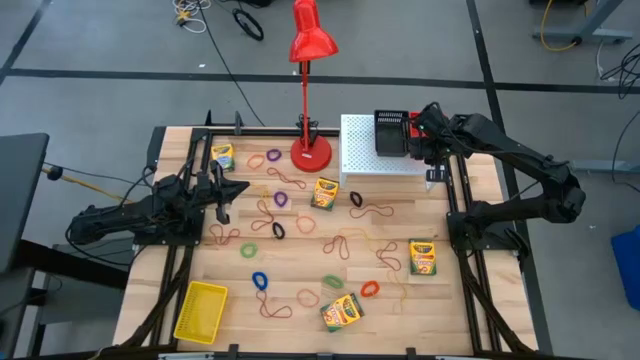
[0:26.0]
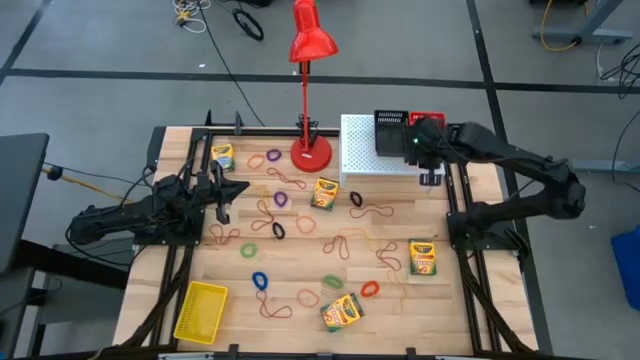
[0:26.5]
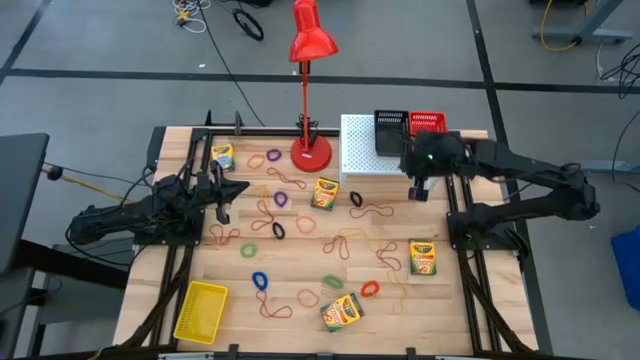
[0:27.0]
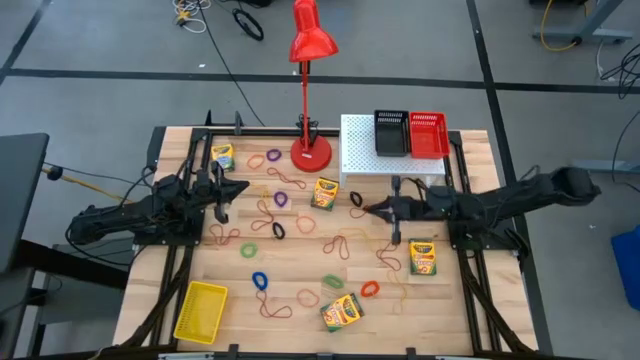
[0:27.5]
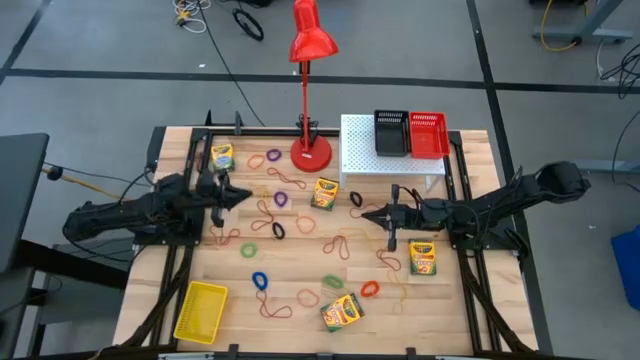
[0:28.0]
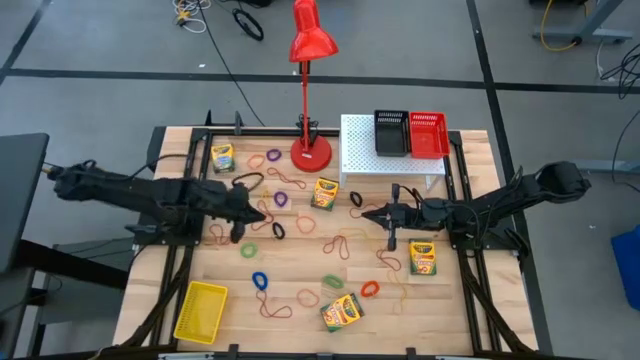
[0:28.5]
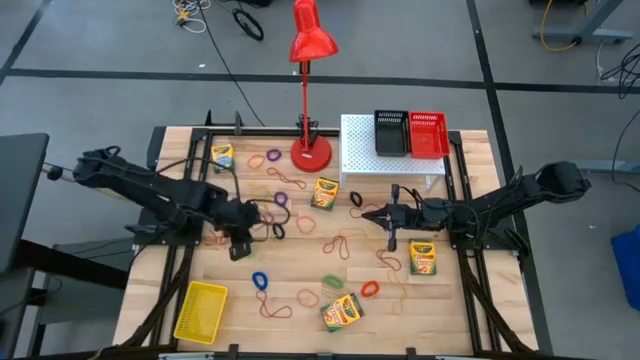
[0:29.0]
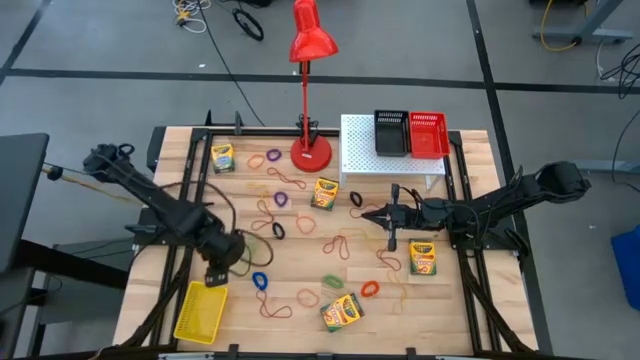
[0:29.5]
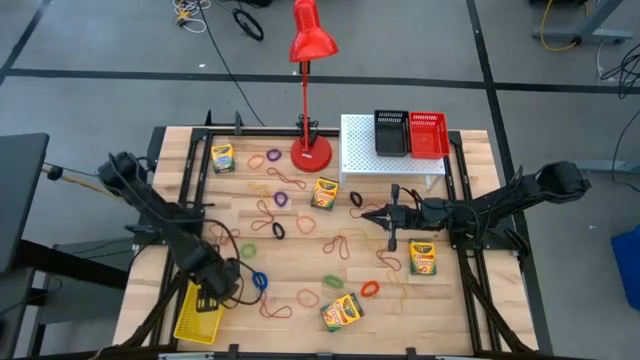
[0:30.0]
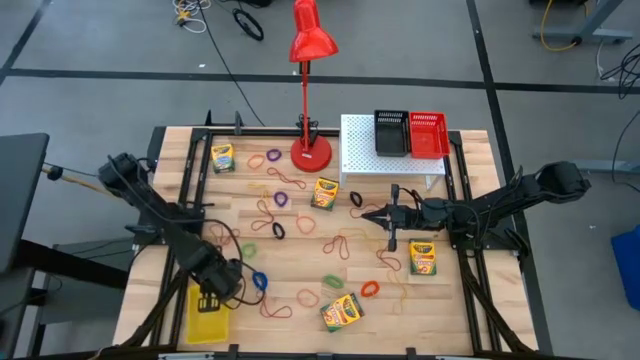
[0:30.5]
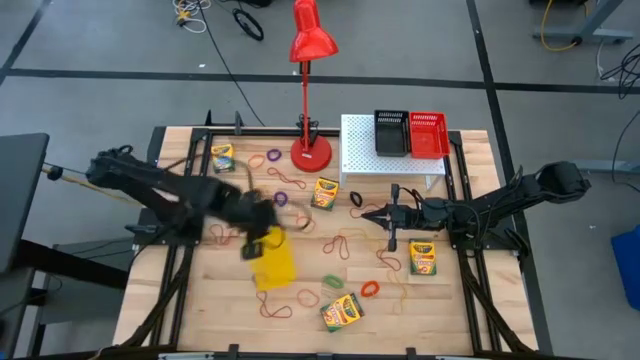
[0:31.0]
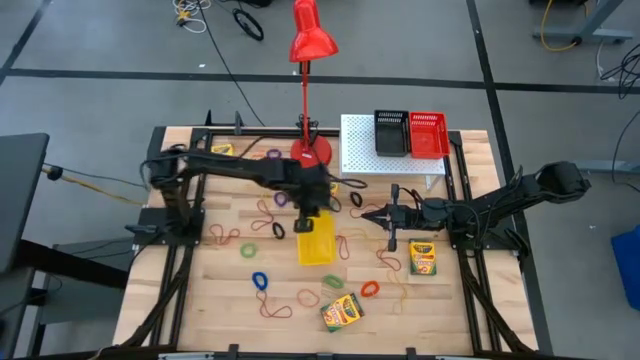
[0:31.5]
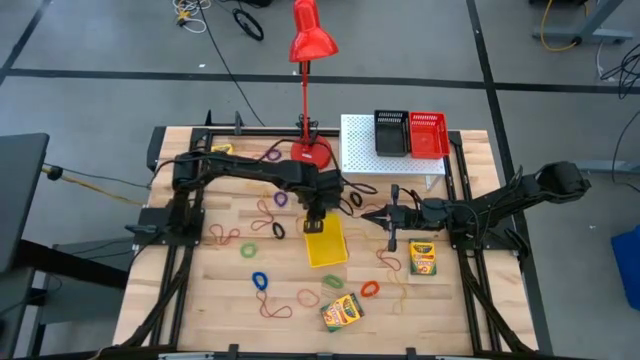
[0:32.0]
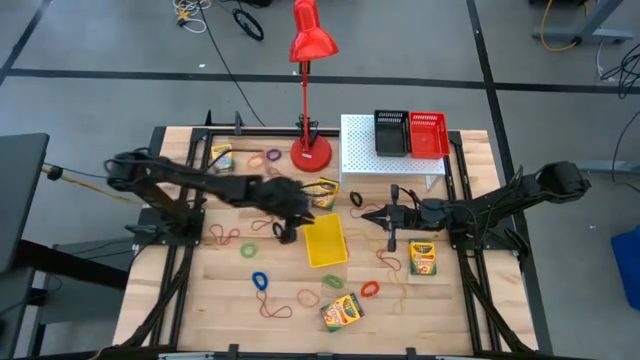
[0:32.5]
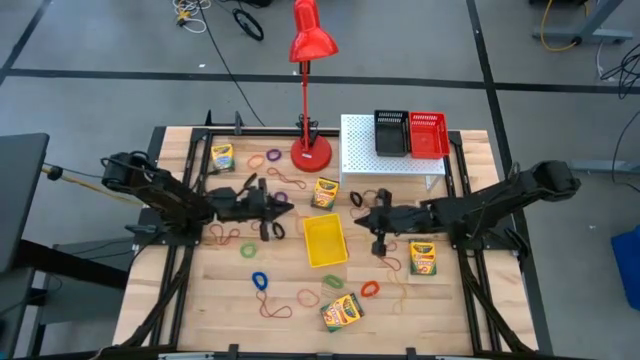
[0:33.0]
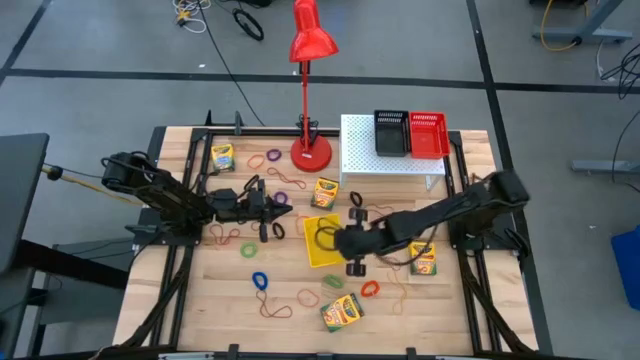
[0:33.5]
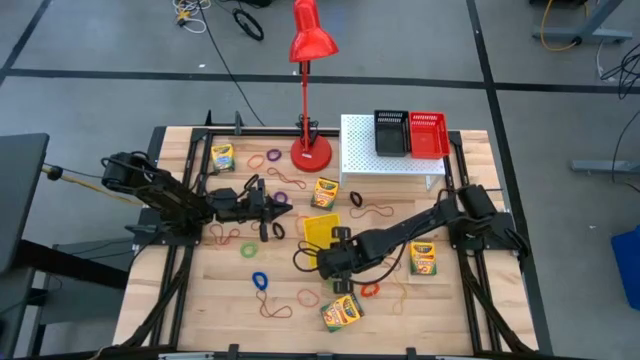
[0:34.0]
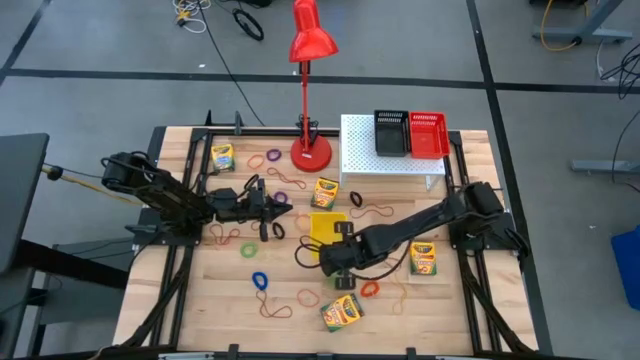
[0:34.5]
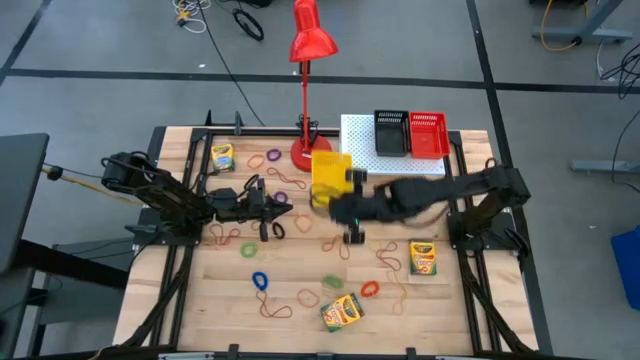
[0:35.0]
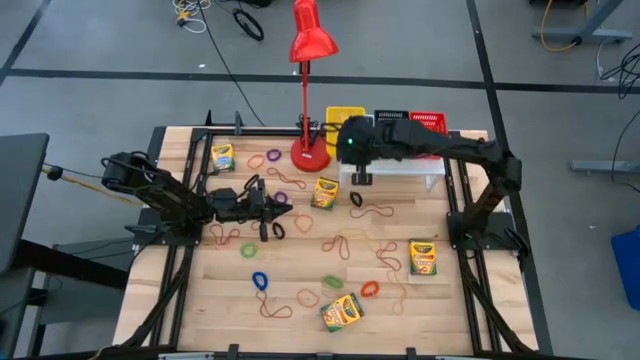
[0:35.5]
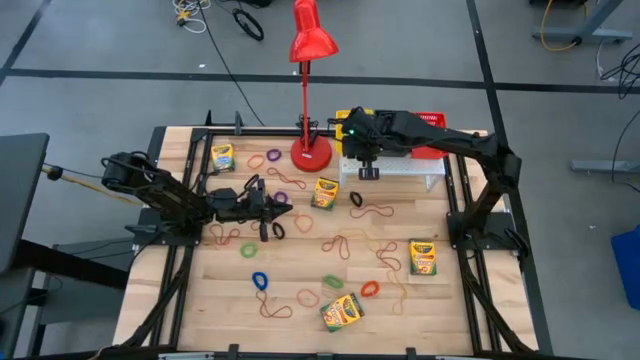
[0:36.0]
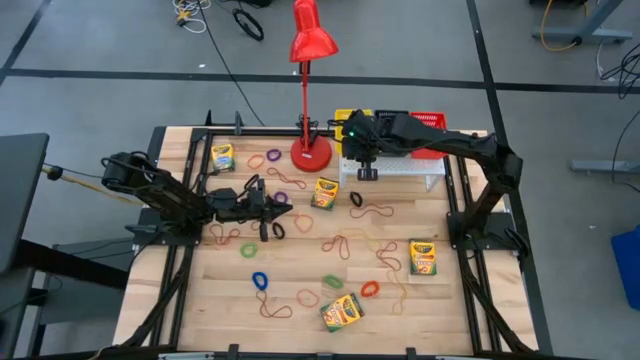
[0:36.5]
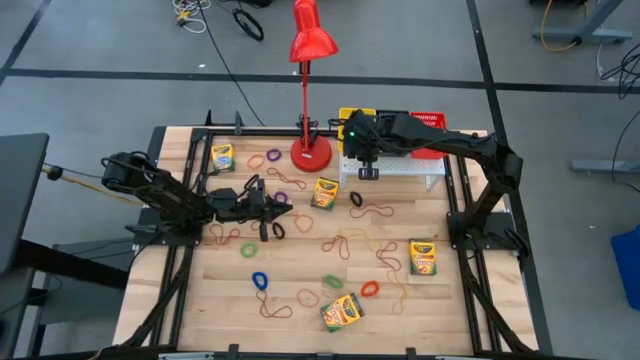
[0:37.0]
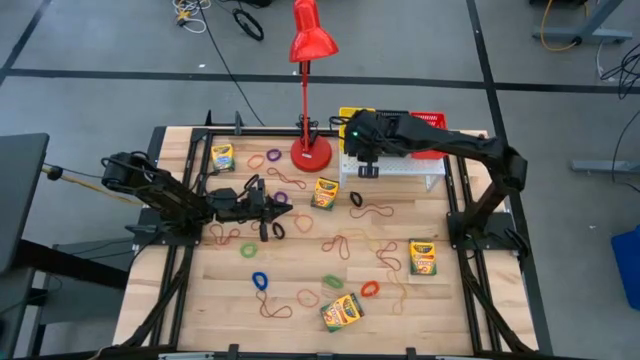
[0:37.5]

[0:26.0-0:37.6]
Task: Pick & Place Office Desk Supplies
Put the yellow bin on the shelf

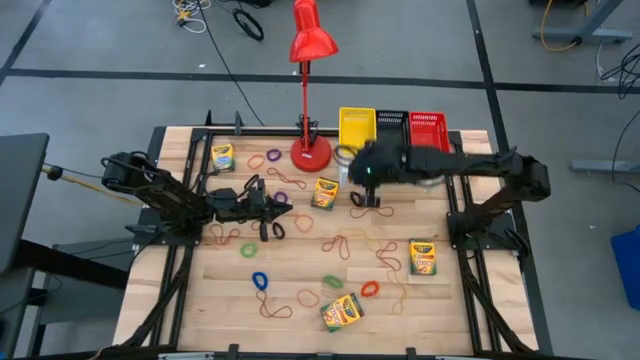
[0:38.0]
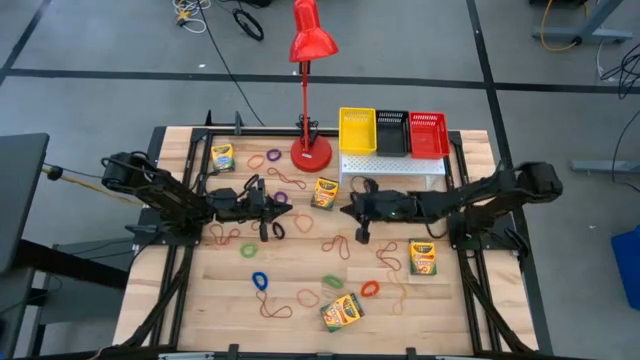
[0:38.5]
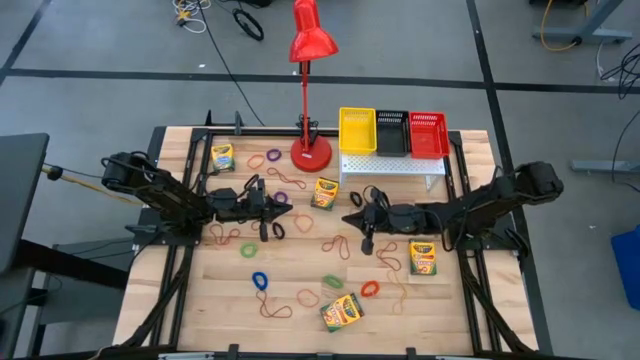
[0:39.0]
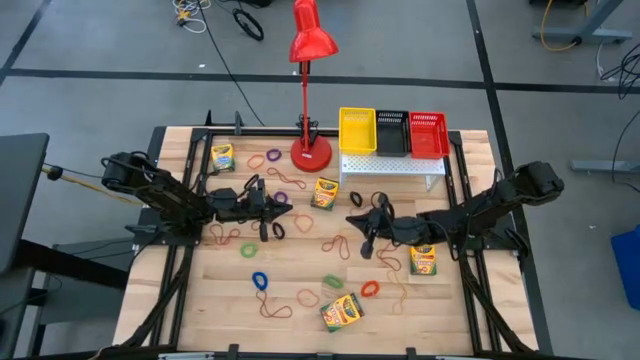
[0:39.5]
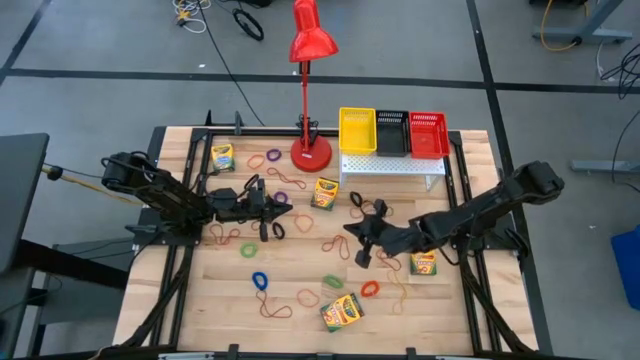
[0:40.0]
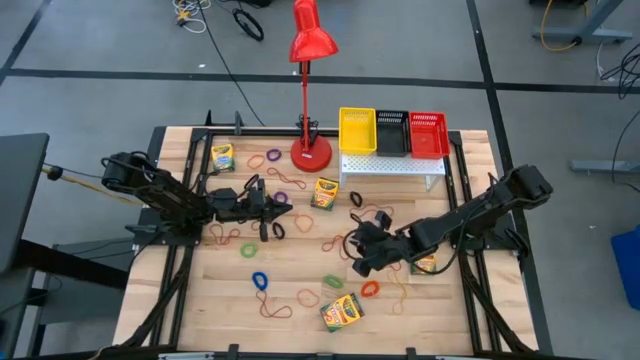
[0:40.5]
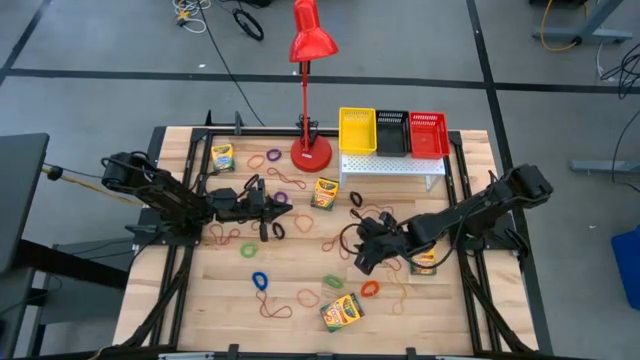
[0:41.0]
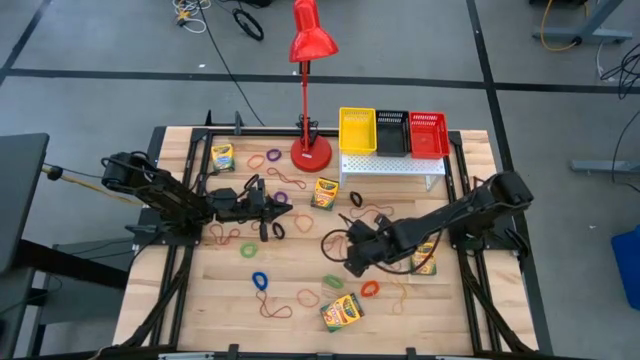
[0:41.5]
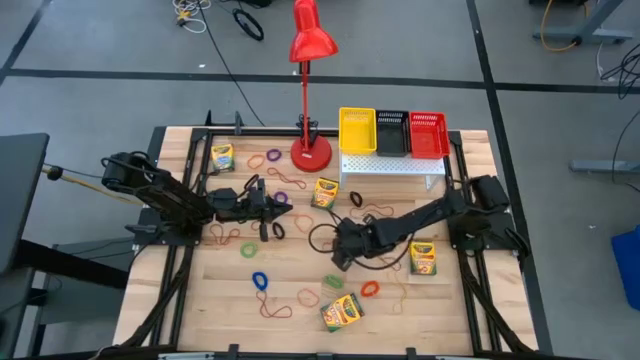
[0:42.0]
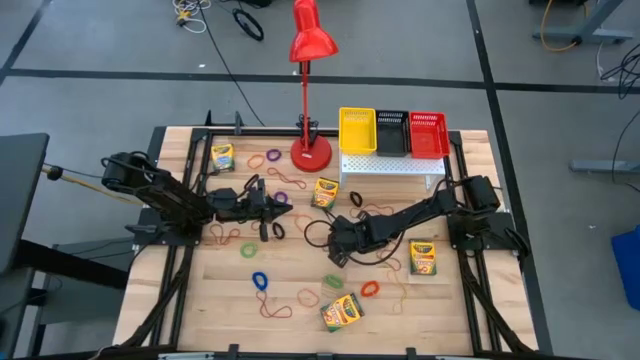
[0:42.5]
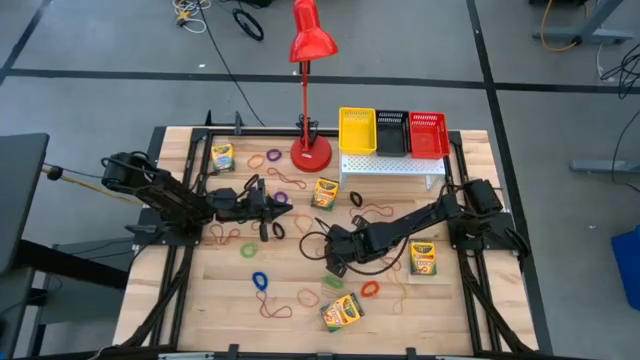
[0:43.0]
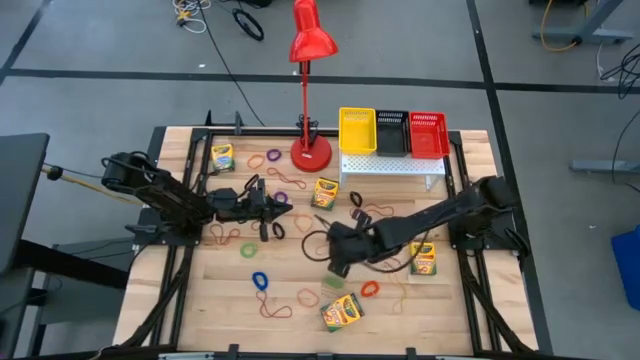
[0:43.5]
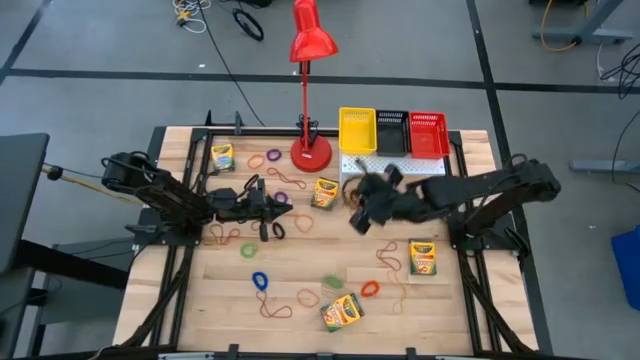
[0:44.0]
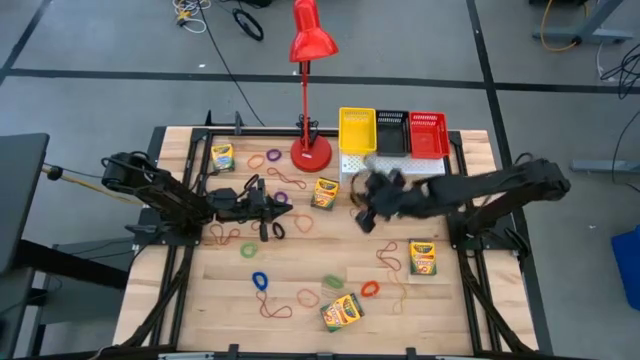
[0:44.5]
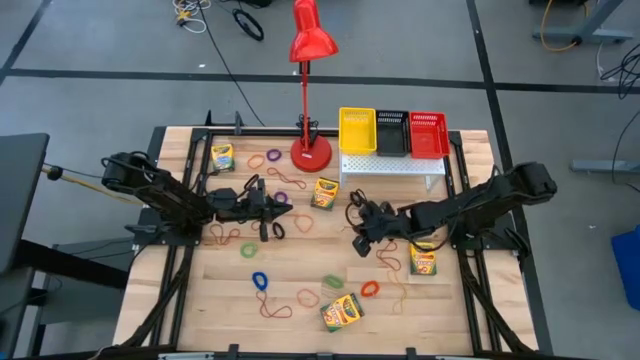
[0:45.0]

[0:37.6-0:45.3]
Put the yellow rubber band into the black bin on the shelf

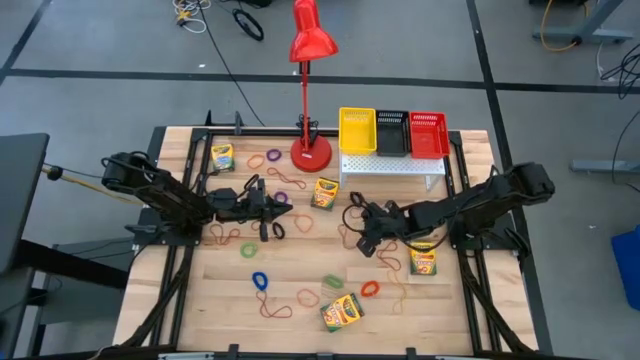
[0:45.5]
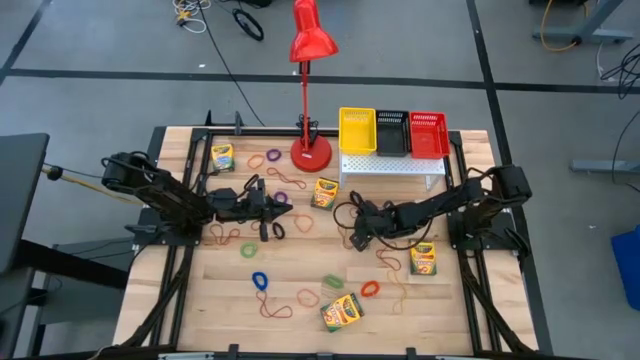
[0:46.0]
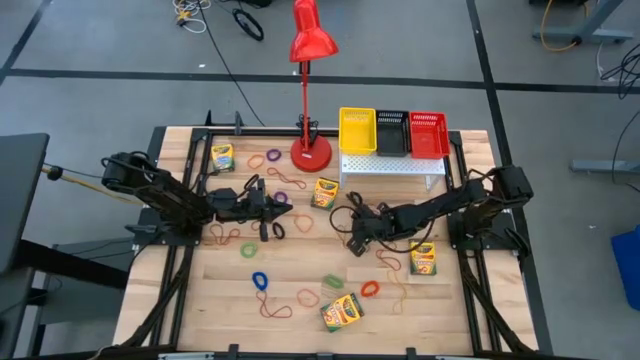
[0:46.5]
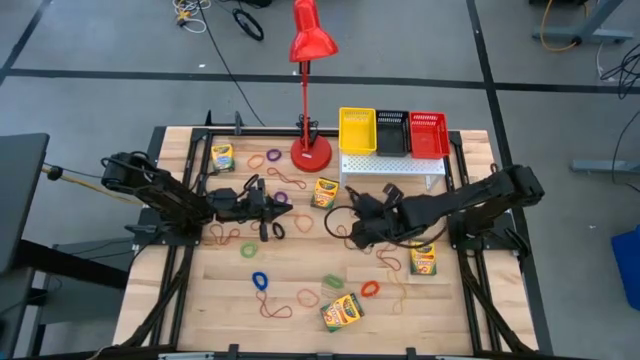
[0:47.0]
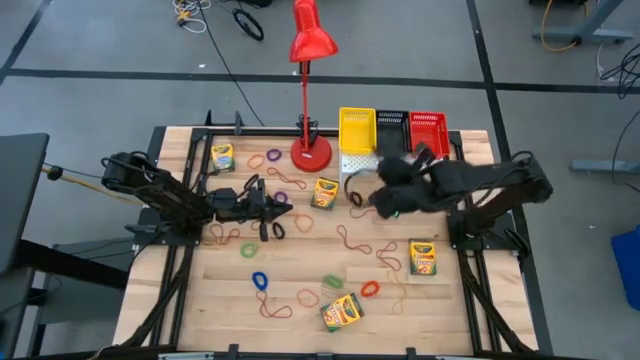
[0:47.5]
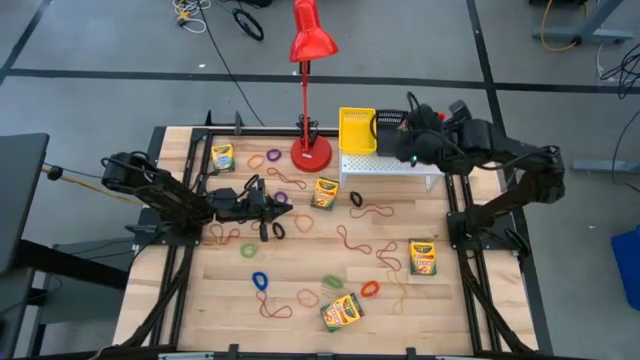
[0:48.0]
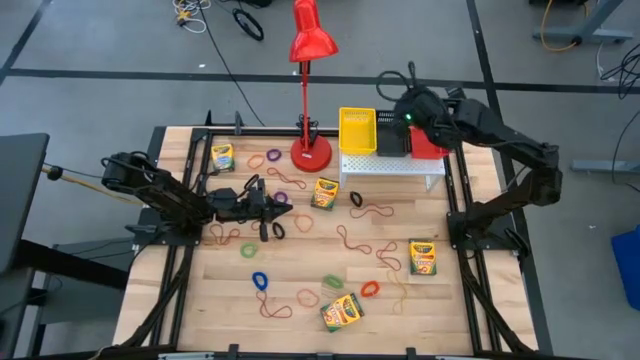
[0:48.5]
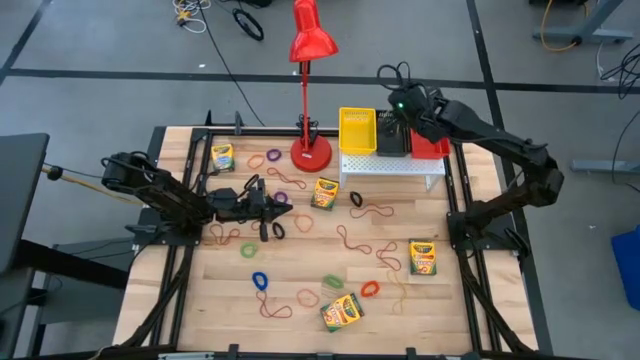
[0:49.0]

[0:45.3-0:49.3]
Put the yellow rubber band into the black bin on the shelf
